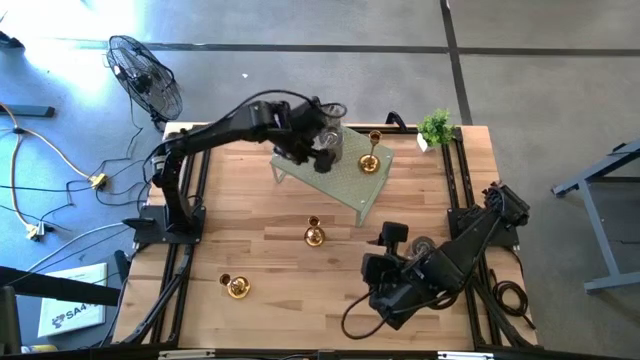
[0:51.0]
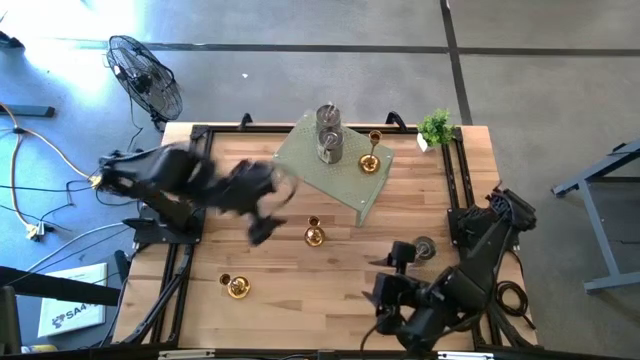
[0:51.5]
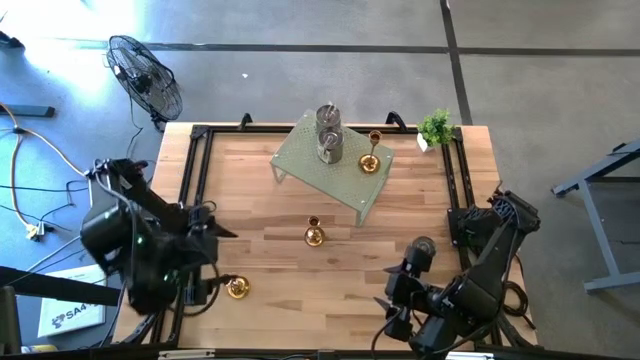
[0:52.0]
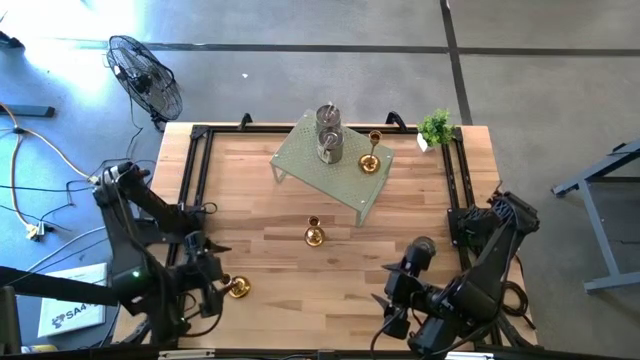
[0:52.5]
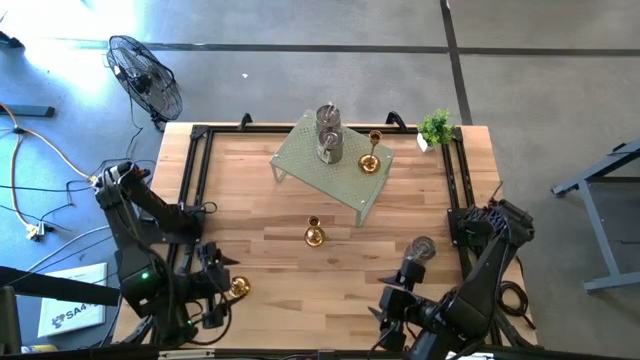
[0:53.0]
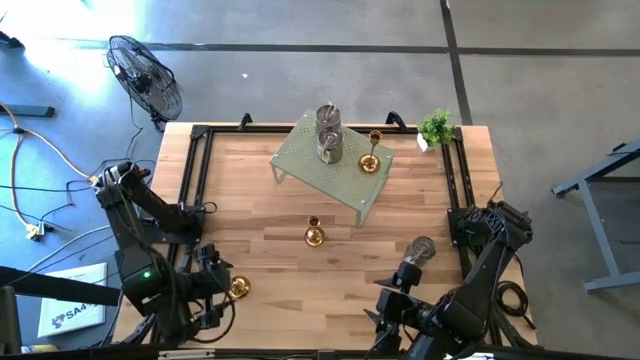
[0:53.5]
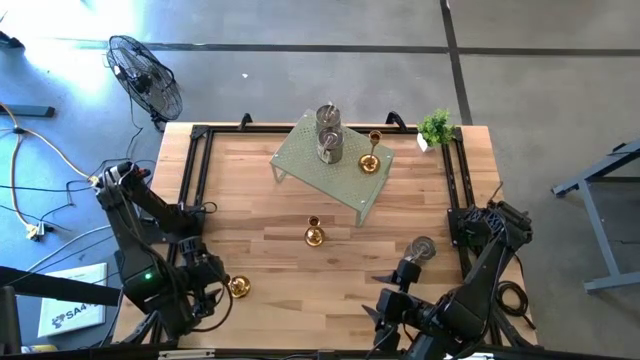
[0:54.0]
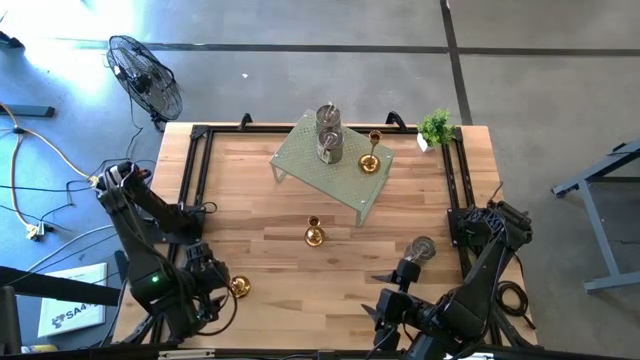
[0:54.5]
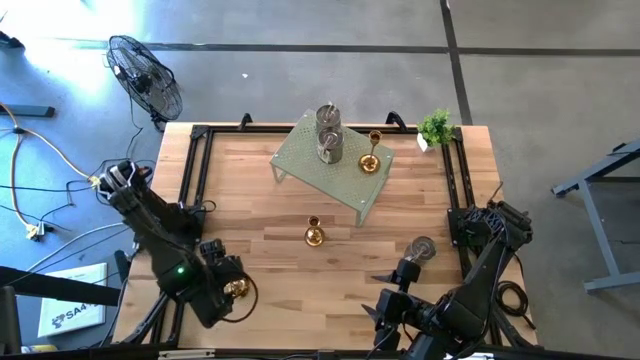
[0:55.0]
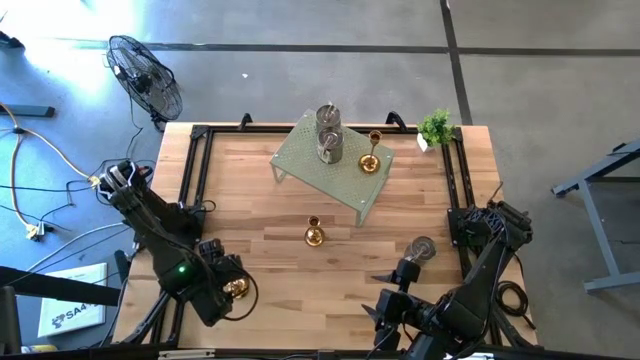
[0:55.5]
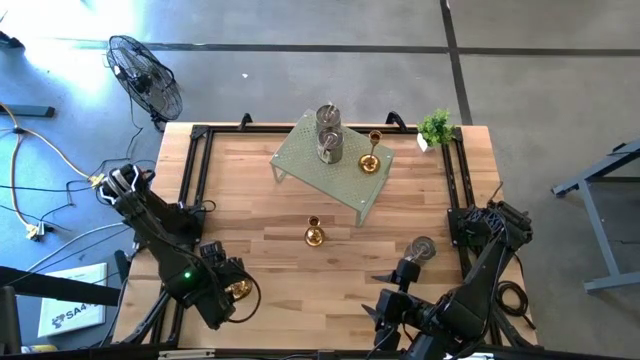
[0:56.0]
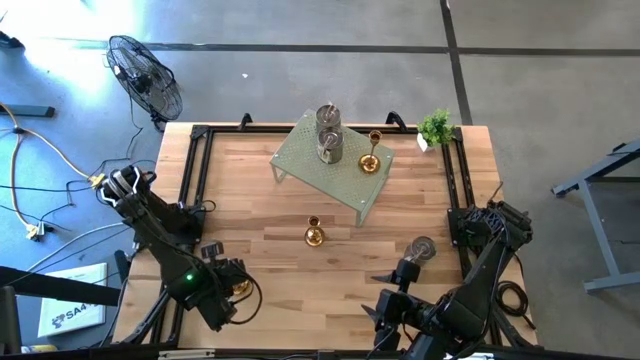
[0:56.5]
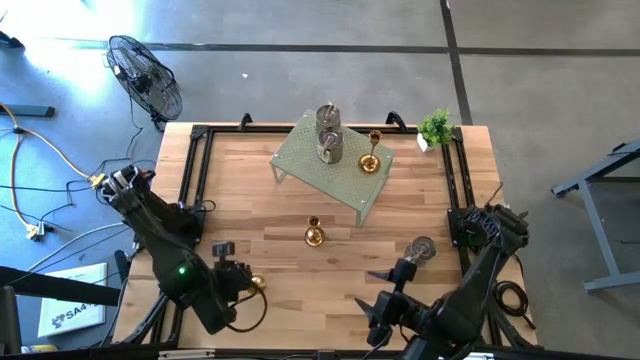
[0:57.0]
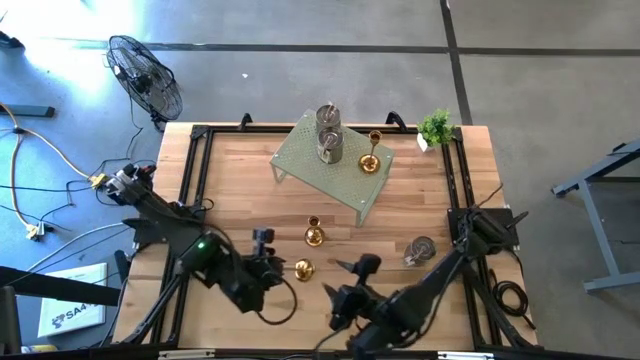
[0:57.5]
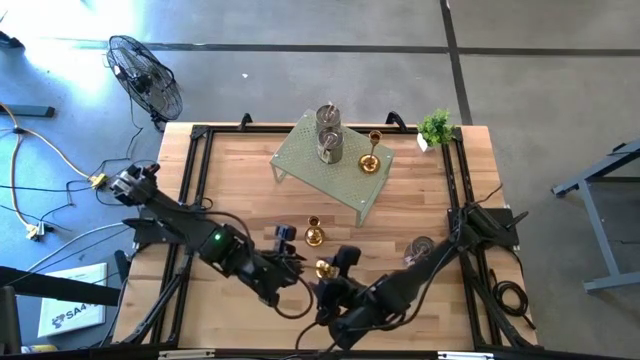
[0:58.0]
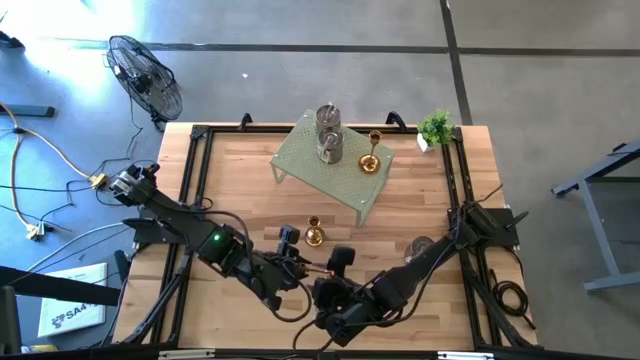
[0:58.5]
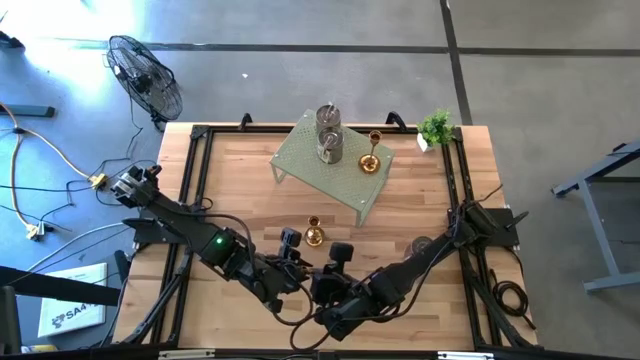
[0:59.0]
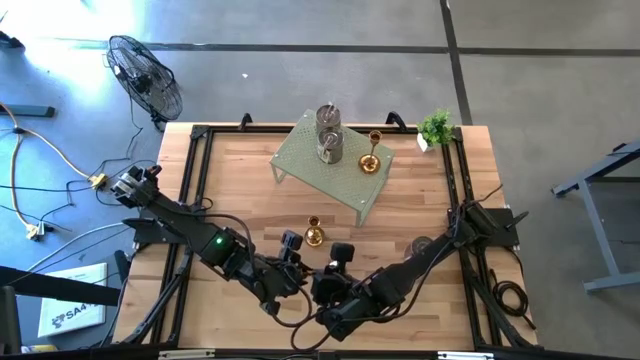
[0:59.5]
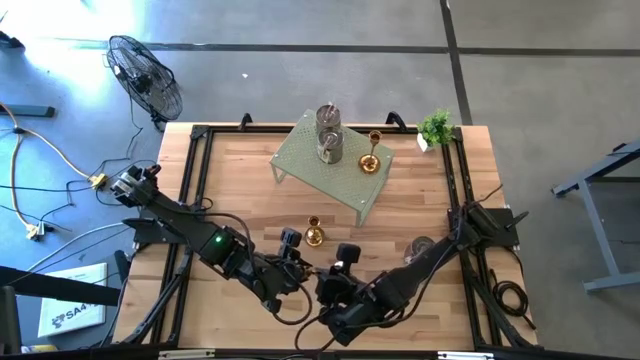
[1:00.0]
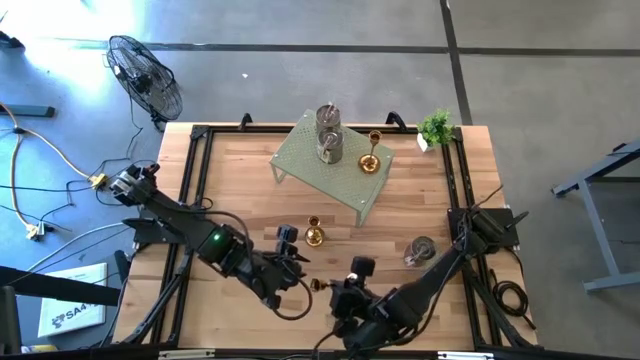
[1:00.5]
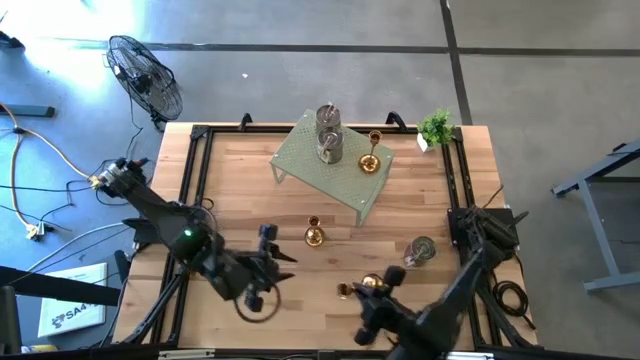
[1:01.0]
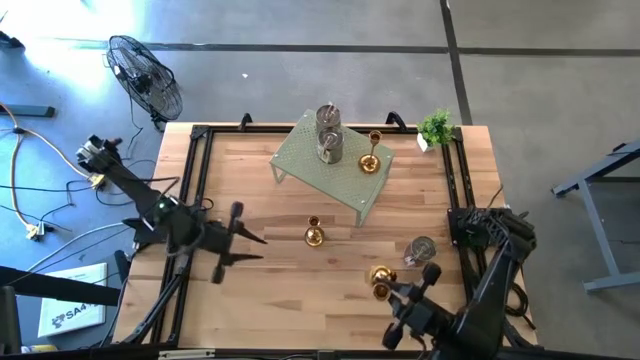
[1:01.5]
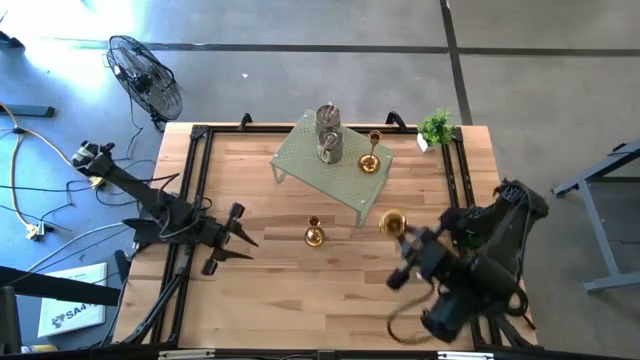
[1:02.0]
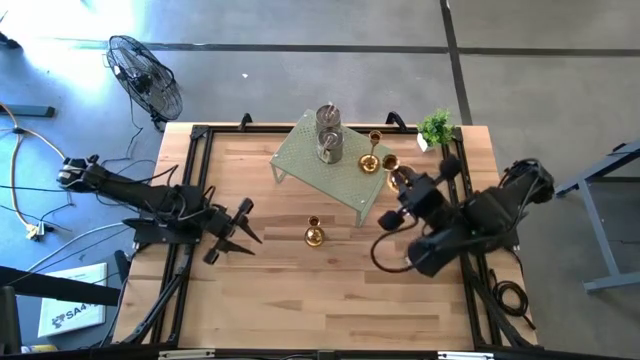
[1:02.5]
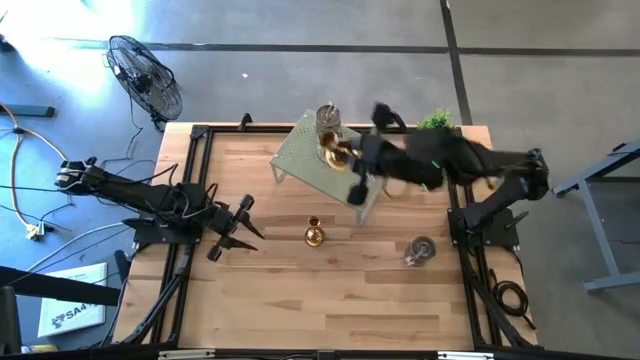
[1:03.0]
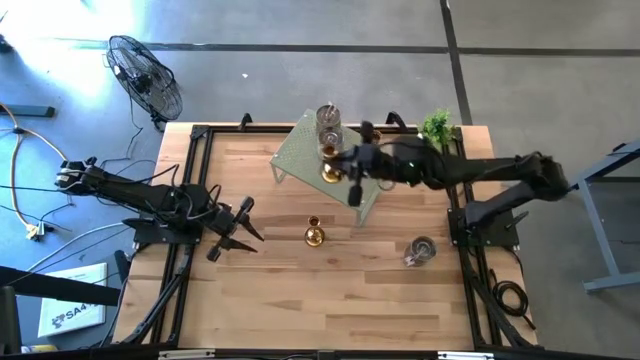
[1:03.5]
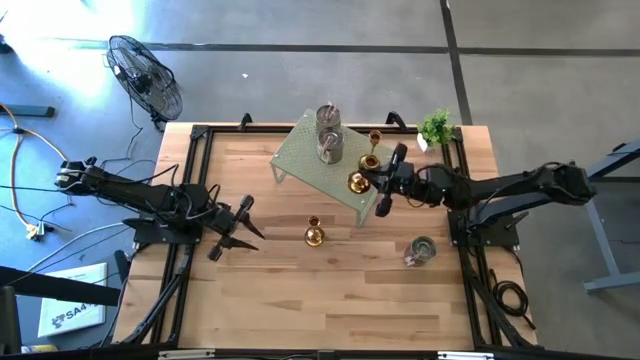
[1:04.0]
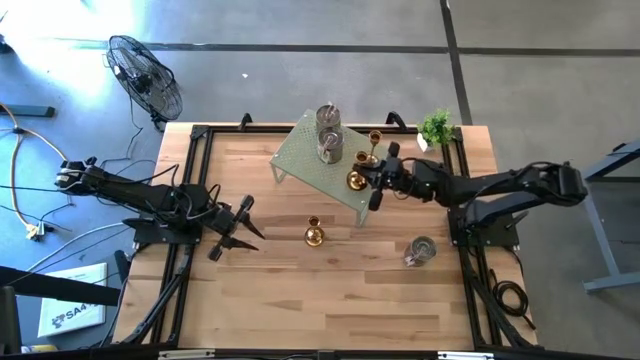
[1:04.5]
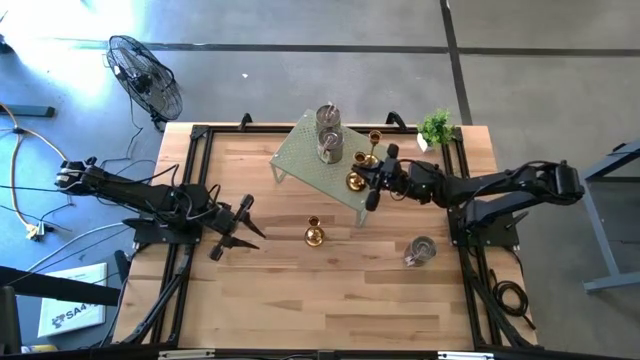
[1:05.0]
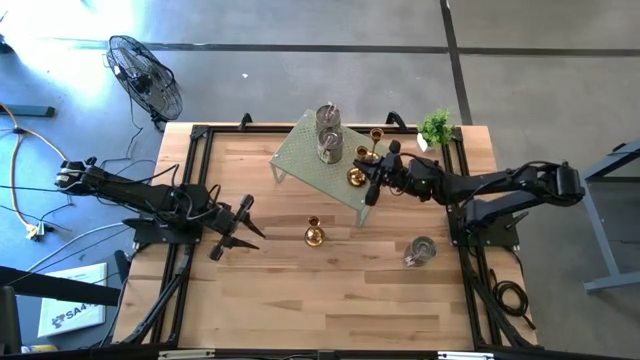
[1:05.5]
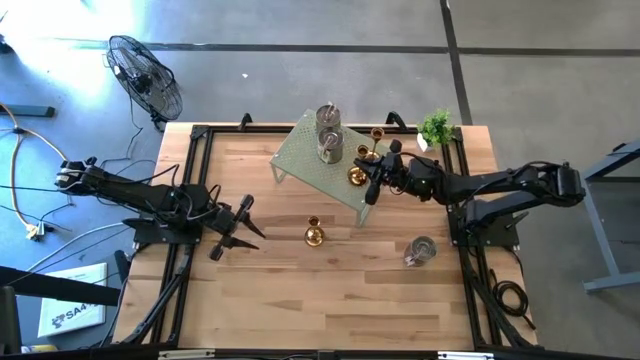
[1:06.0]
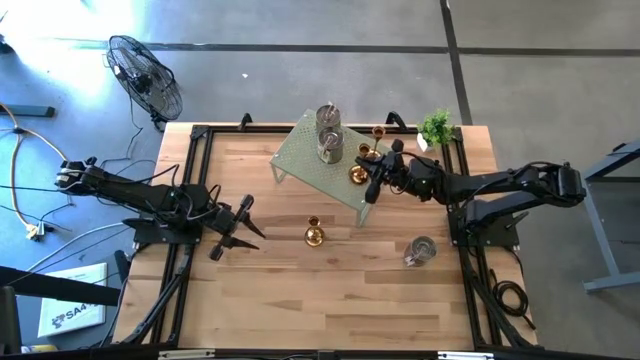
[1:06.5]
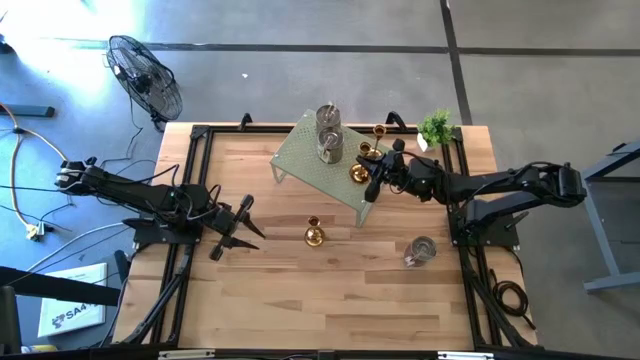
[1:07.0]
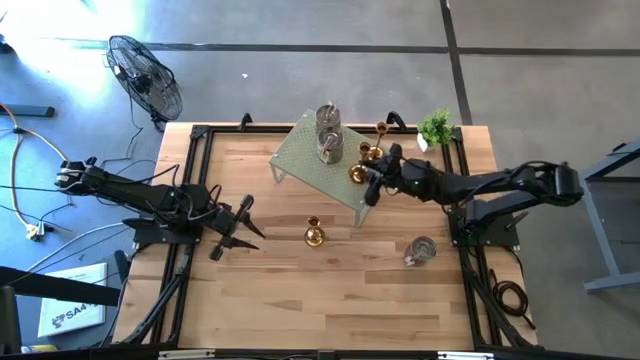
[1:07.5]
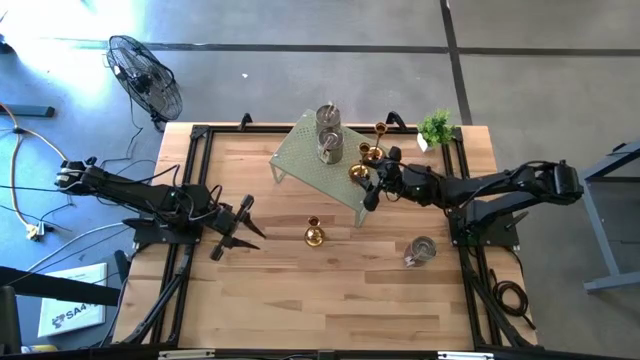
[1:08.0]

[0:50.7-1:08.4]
Task: Pick & Place candle stick holders
Put the left gold candle holder on the shelf

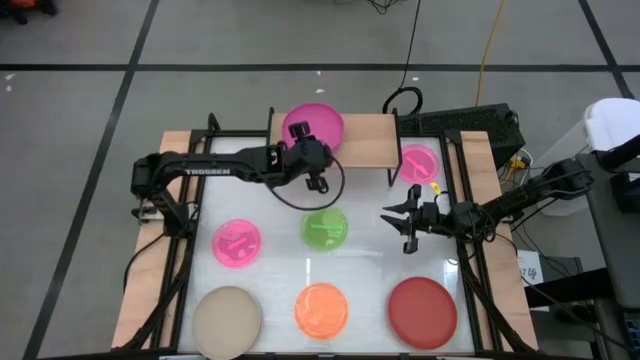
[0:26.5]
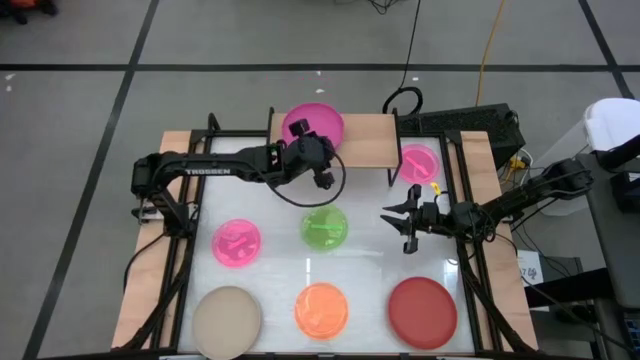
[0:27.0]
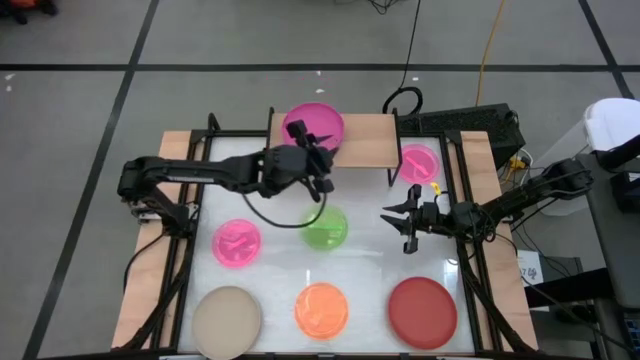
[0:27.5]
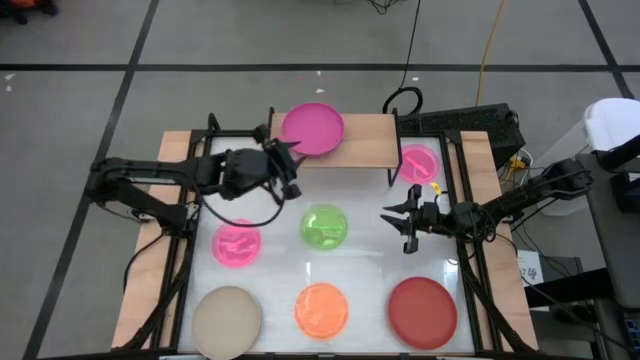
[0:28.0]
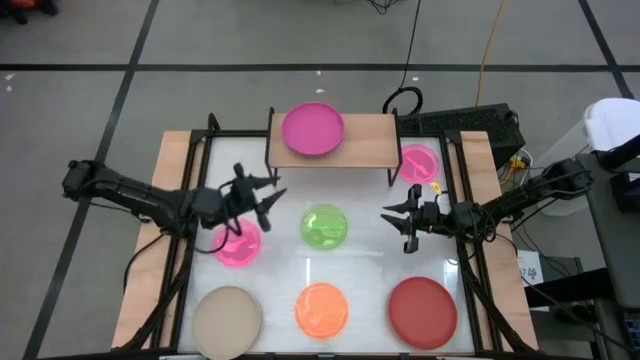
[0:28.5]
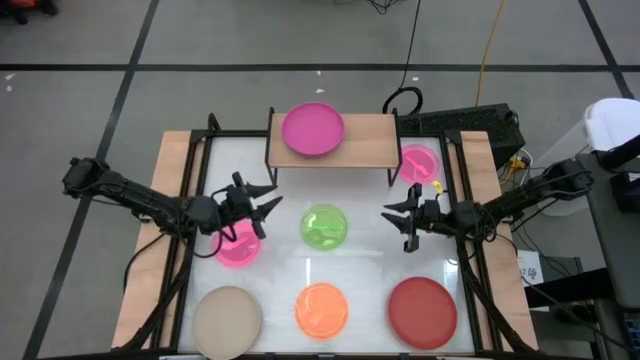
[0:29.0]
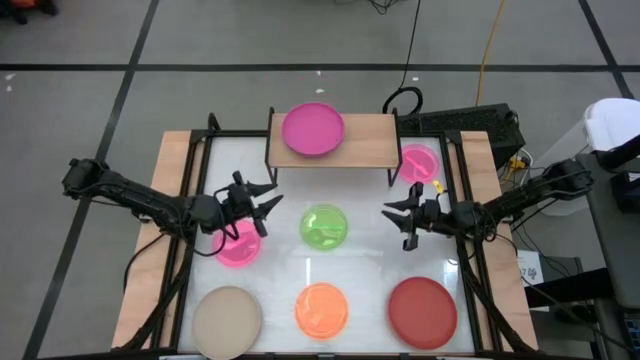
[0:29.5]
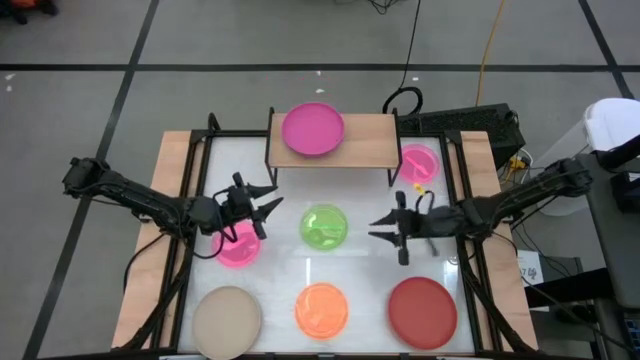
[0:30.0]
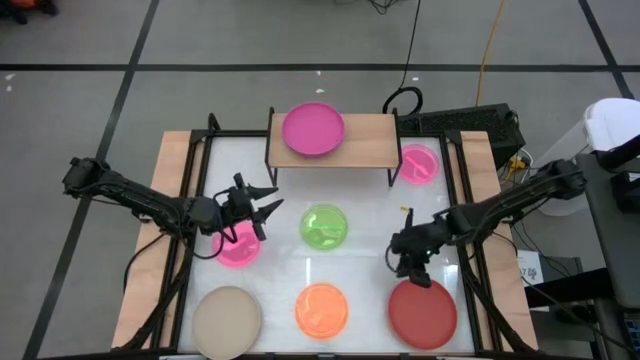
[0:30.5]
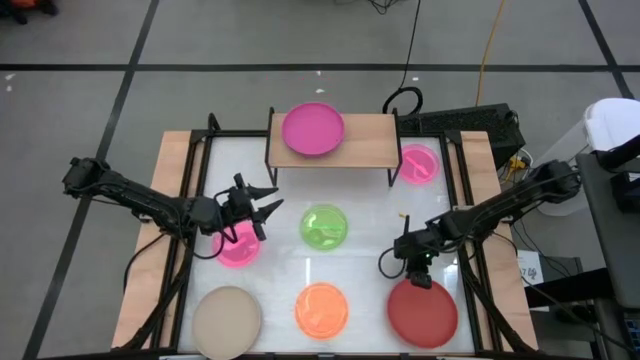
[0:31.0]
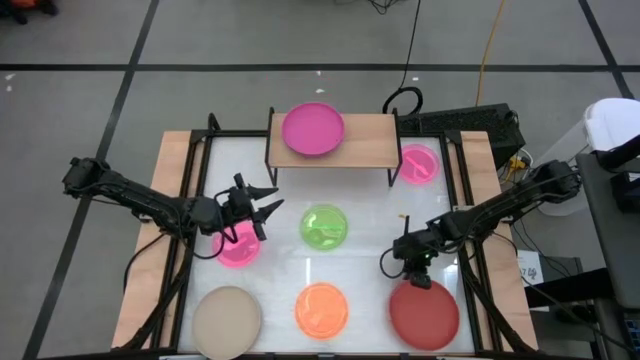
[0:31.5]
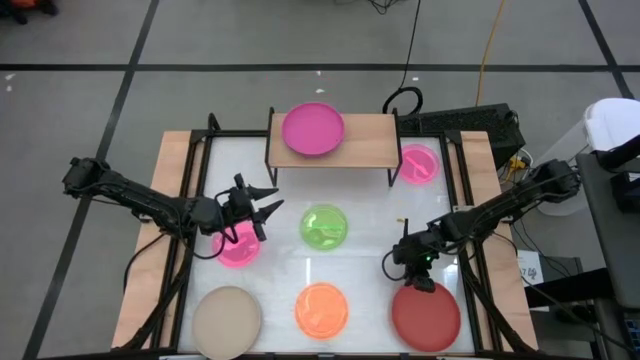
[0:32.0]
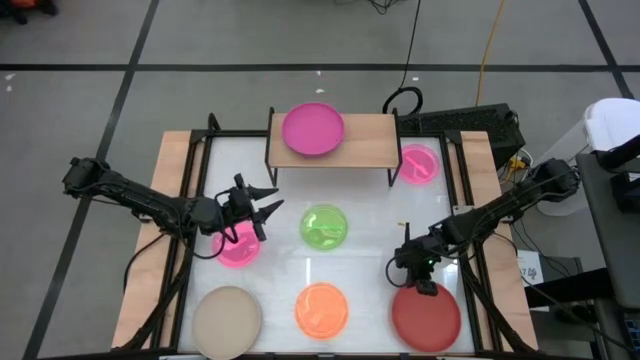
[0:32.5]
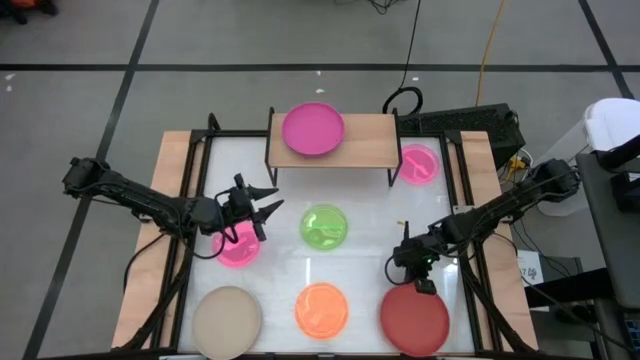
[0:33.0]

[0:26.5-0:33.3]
Task: Place and stack plates onto a shelf
Stack the orange plate on top of the pink plate on the shelf
